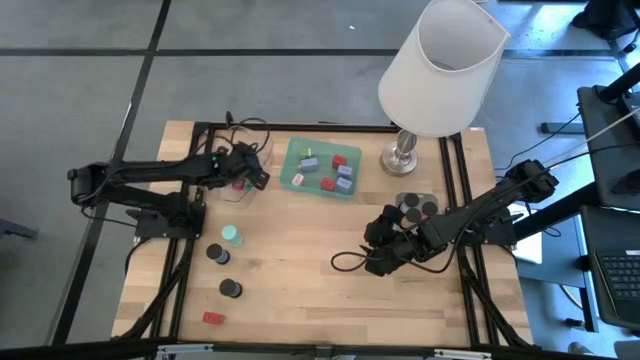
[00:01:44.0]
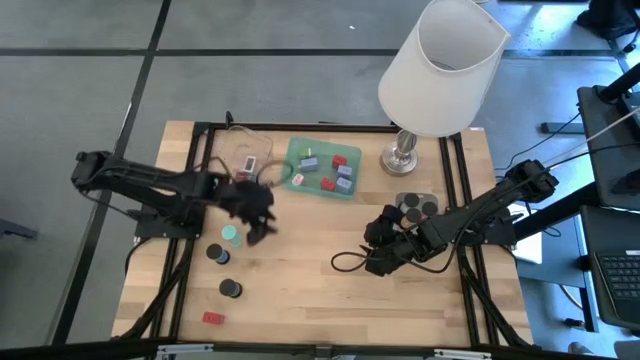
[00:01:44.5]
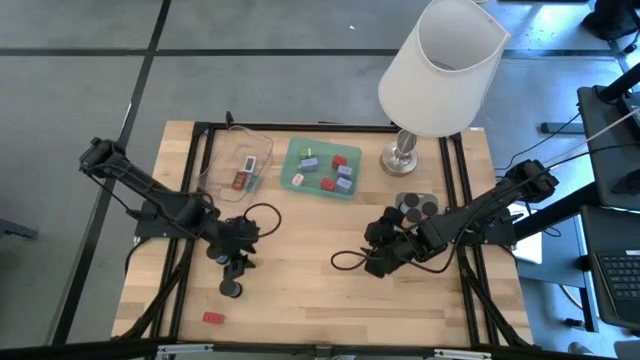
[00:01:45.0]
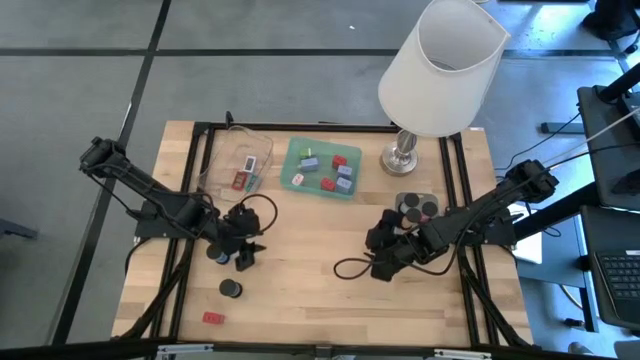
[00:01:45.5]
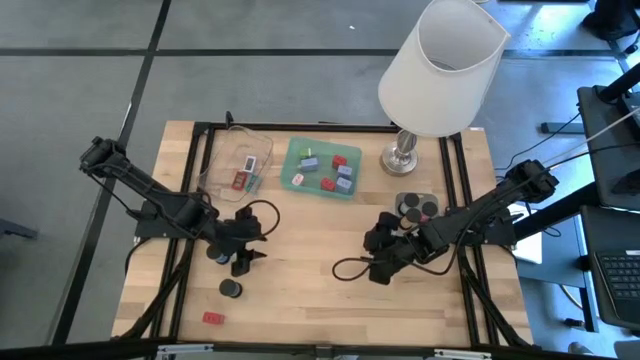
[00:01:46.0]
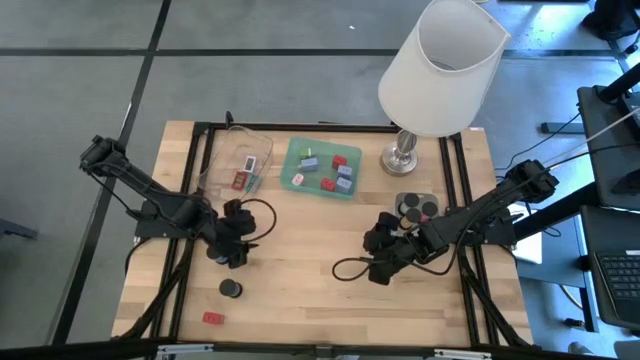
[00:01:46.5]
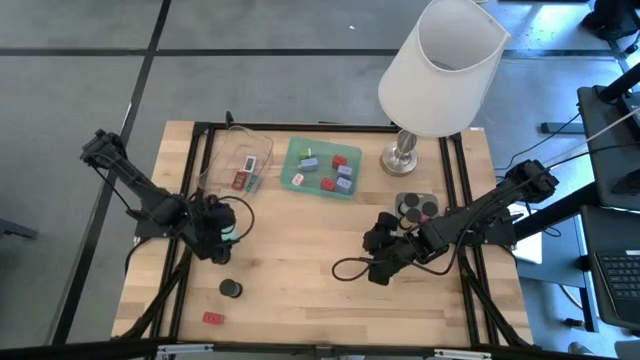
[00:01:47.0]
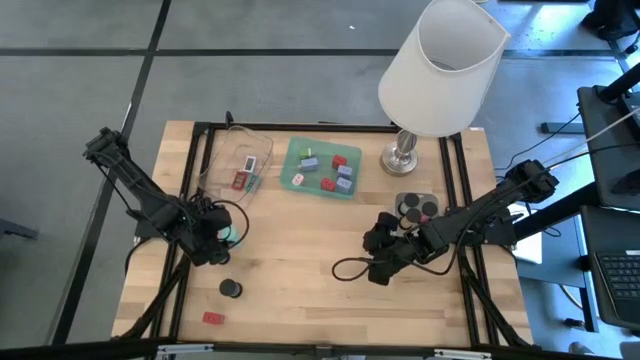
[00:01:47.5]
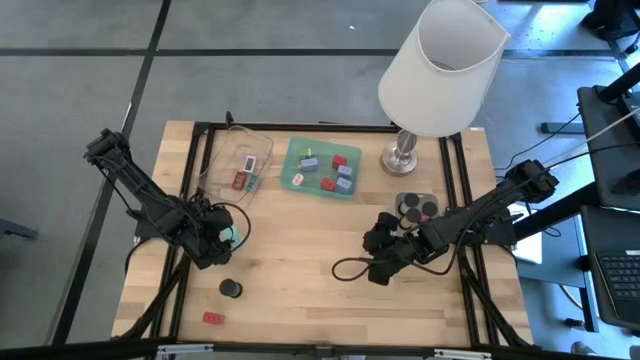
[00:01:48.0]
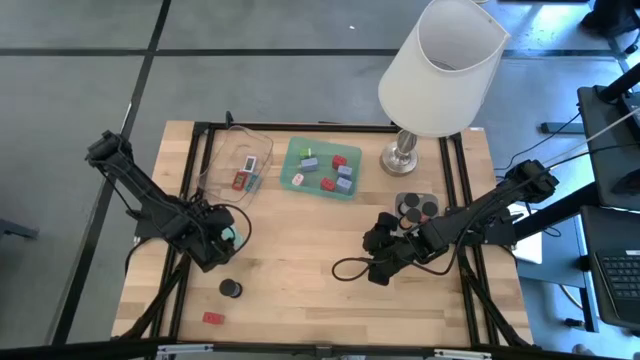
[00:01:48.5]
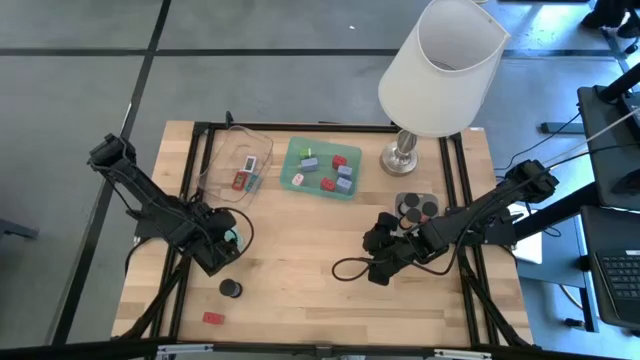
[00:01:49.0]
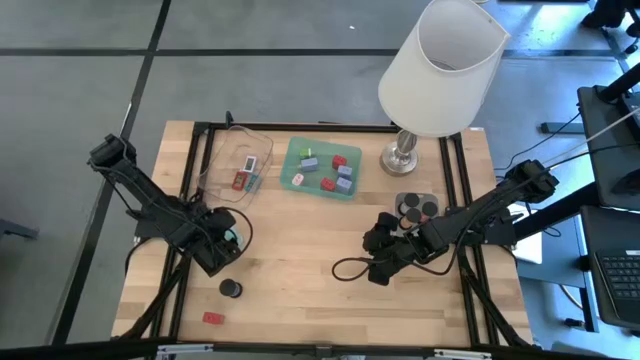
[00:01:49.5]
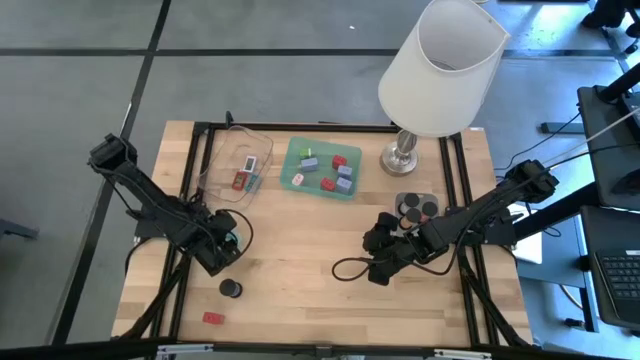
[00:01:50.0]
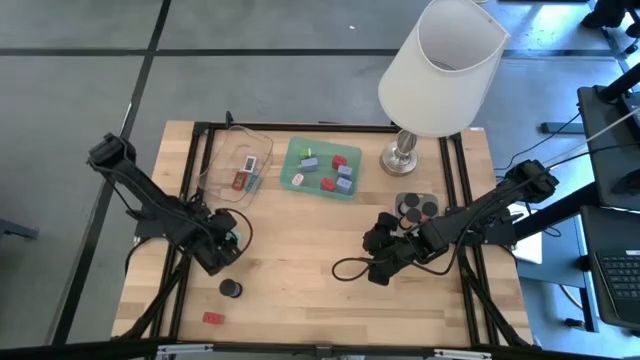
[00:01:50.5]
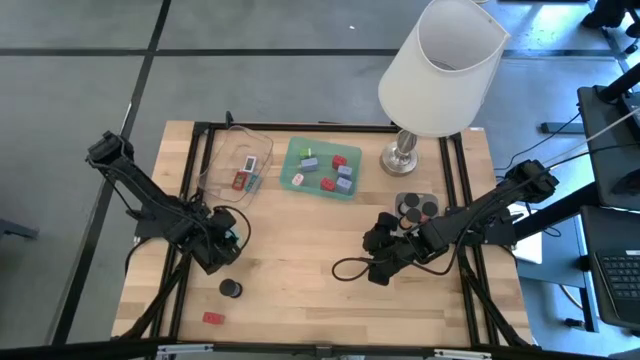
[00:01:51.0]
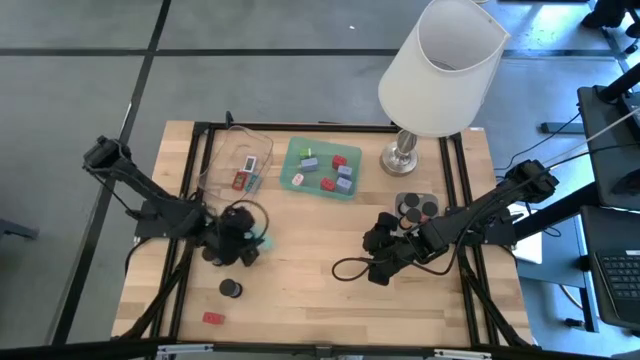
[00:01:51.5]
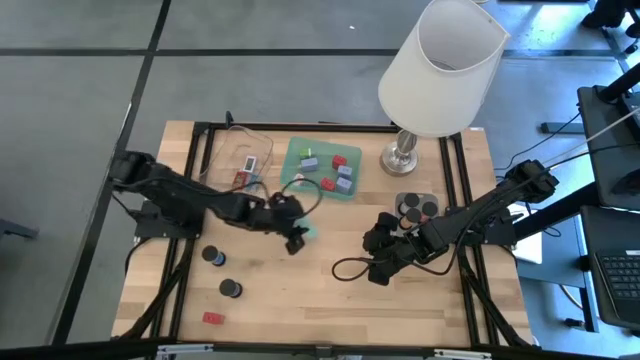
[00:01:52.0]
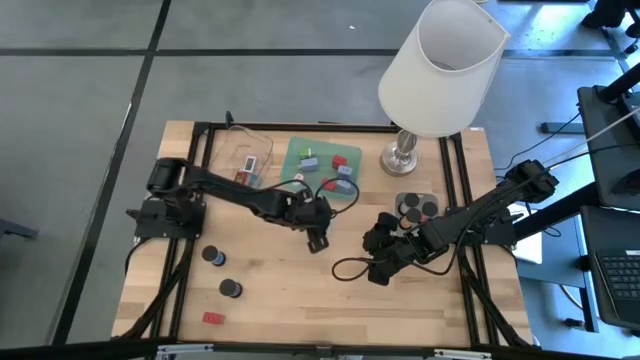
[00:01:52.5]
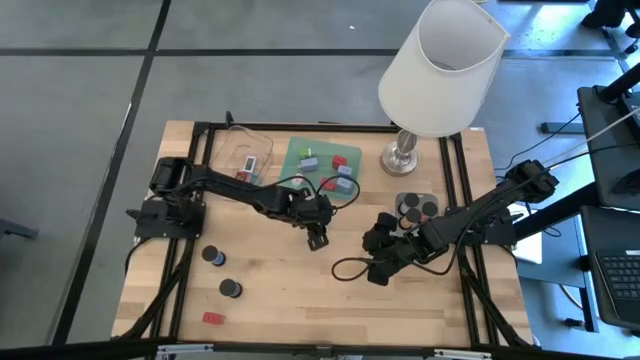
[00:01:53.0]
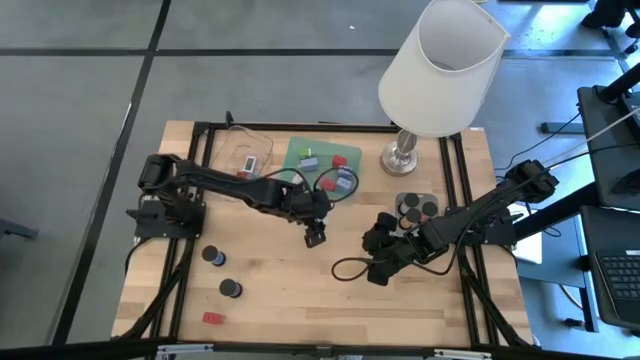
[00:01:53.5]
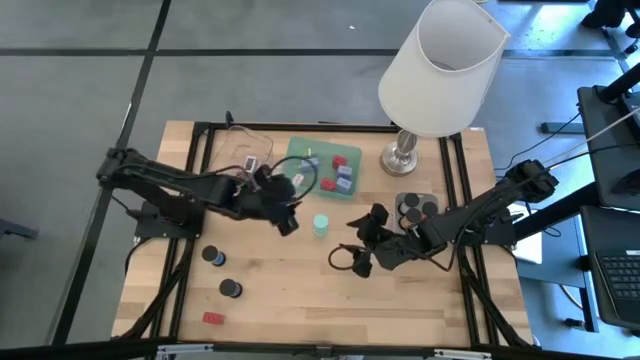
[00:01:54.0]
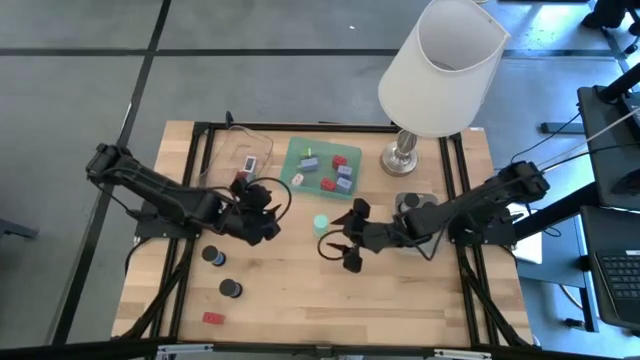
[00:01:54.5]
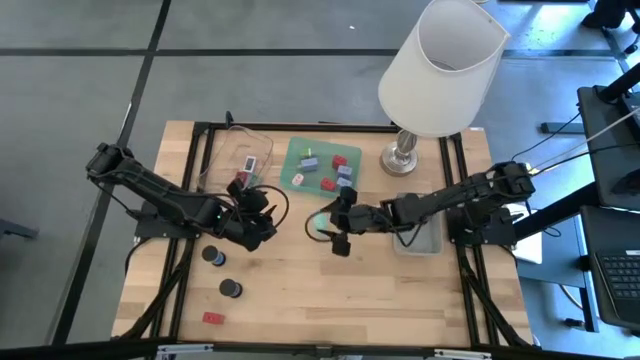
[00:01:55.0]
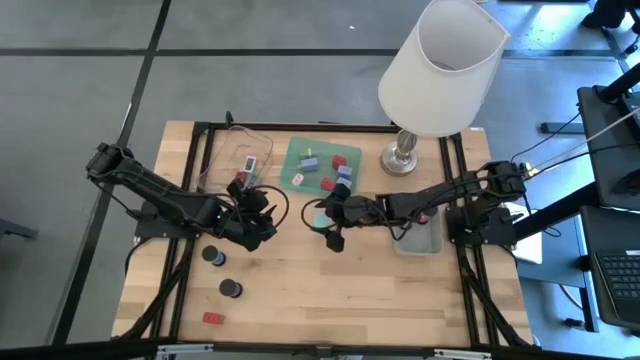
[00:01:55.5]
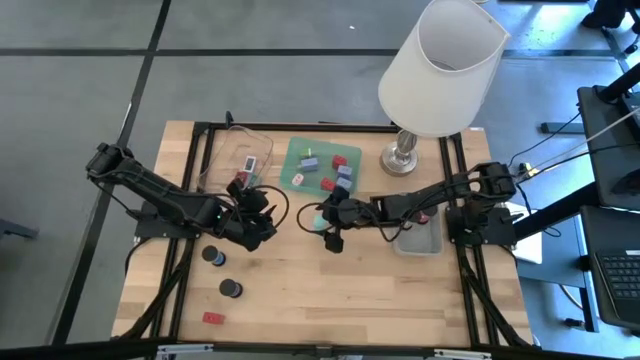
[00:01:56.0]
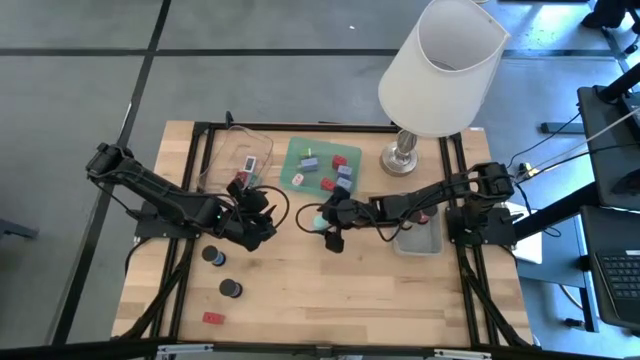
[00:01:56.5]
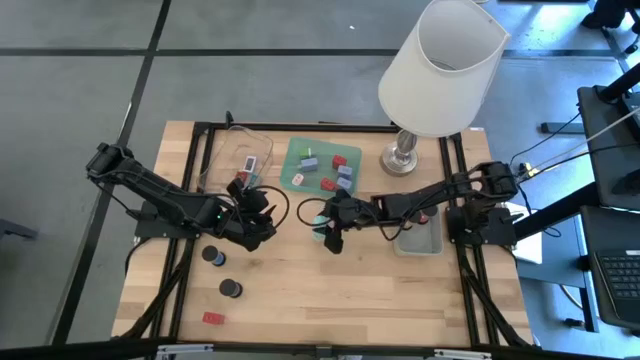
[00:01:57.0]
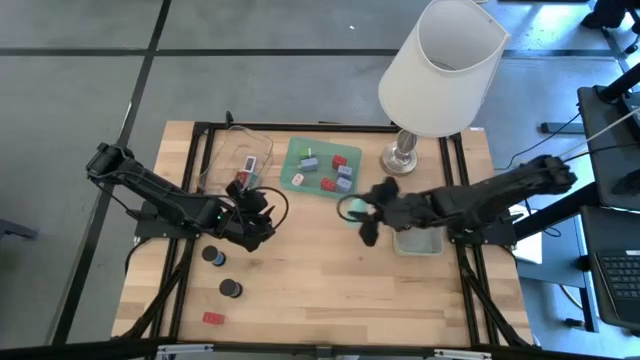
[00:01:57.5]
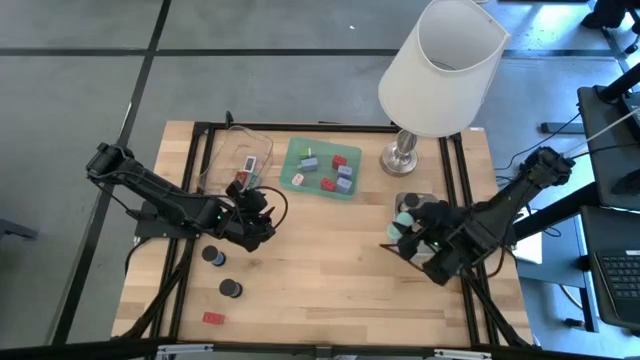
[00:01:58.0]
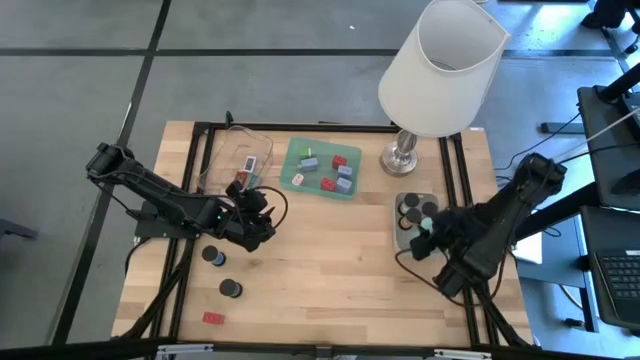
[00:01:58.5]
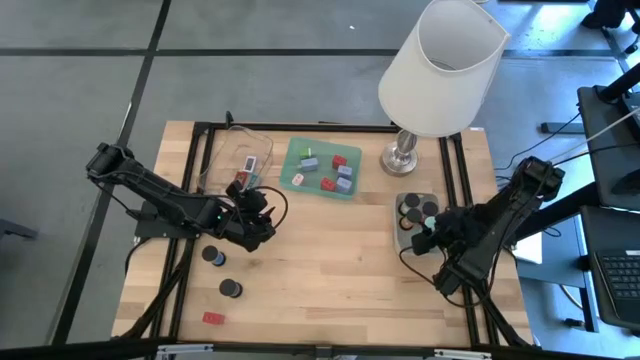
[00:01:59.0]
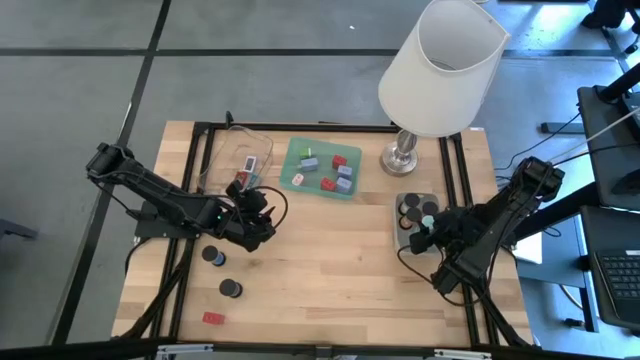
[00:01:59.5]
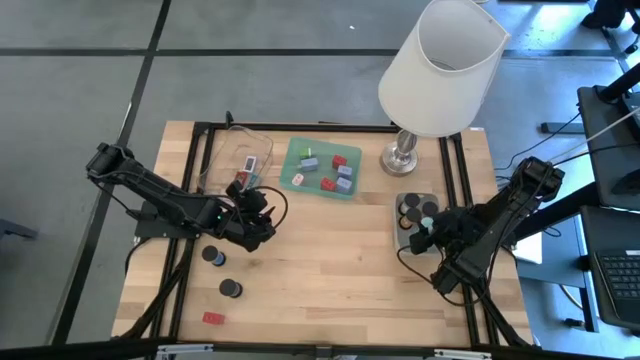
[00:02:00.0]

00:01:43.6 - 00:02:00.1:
Task: Pick & Place Office items
Put the light blue hourglass into the gray bin
